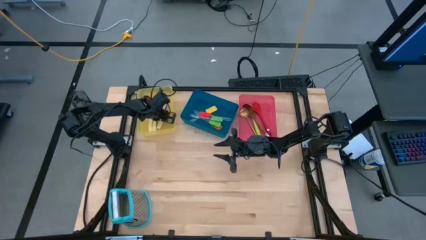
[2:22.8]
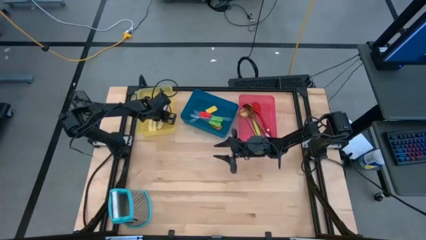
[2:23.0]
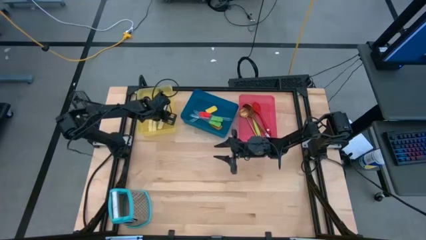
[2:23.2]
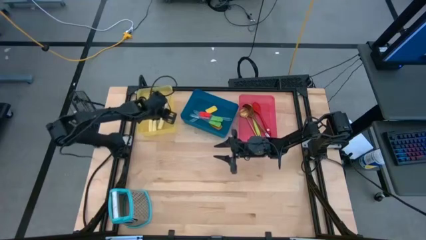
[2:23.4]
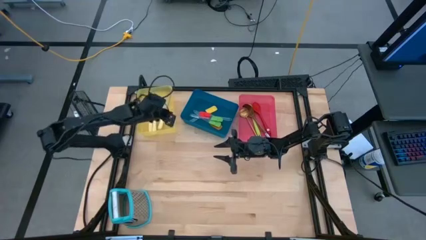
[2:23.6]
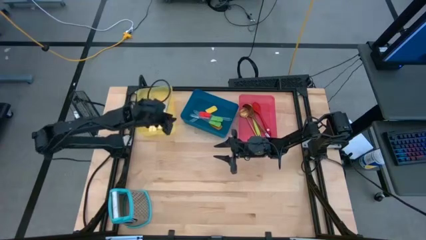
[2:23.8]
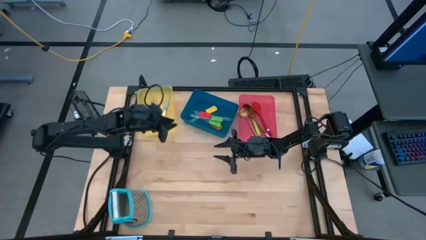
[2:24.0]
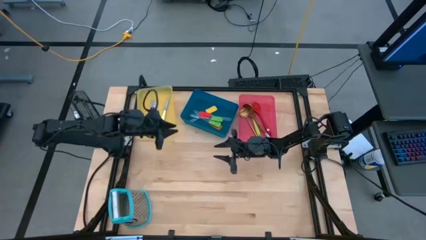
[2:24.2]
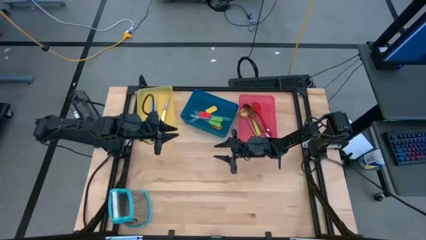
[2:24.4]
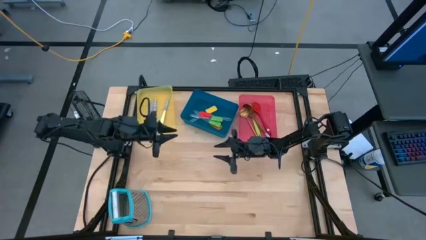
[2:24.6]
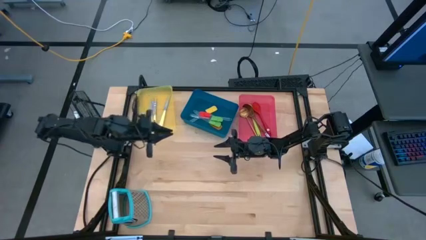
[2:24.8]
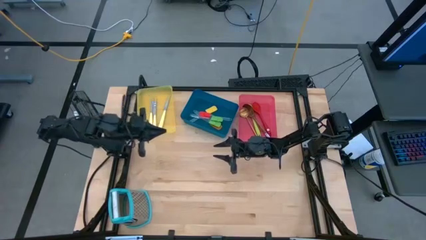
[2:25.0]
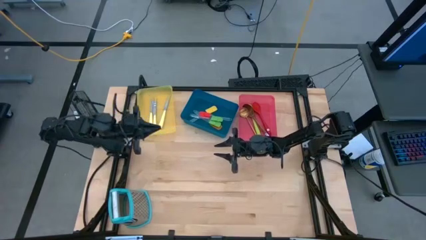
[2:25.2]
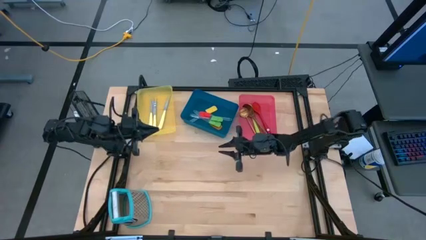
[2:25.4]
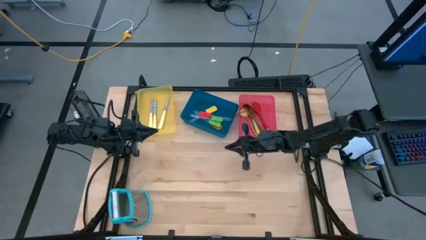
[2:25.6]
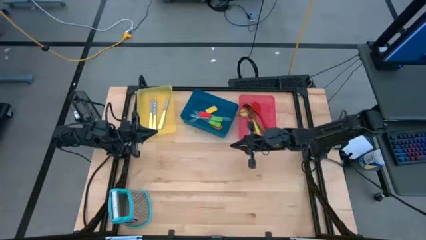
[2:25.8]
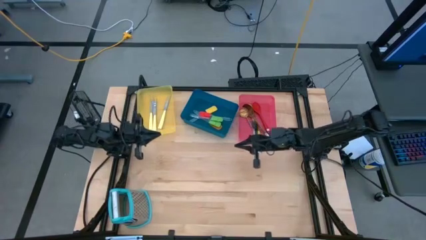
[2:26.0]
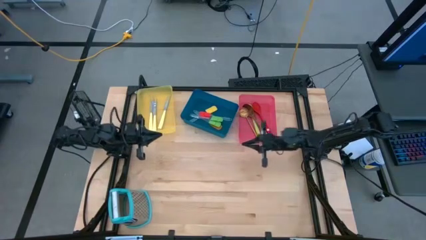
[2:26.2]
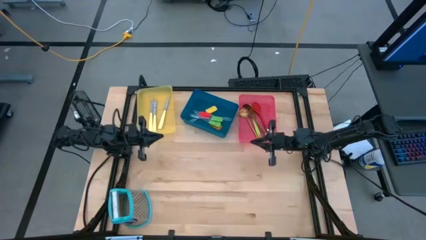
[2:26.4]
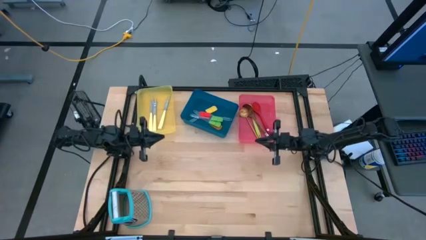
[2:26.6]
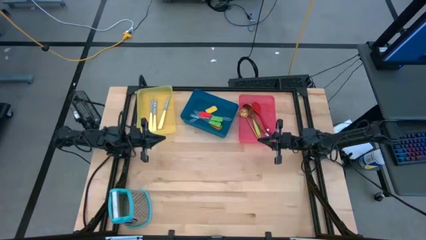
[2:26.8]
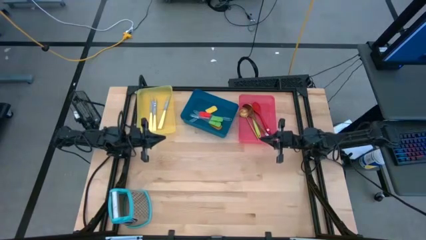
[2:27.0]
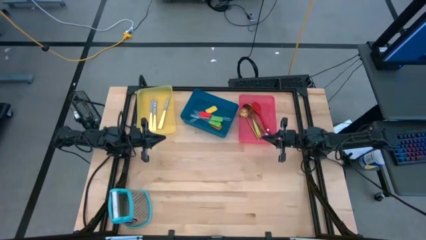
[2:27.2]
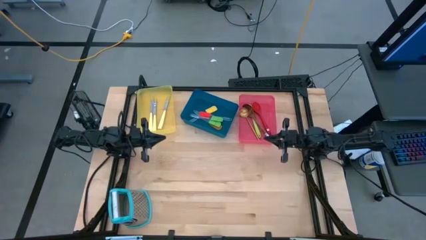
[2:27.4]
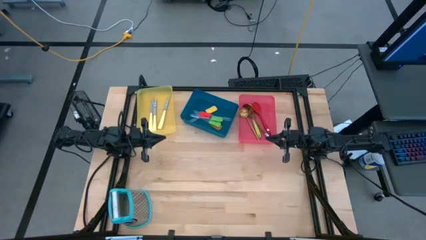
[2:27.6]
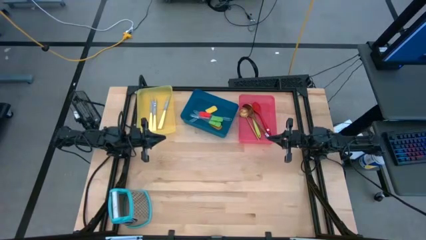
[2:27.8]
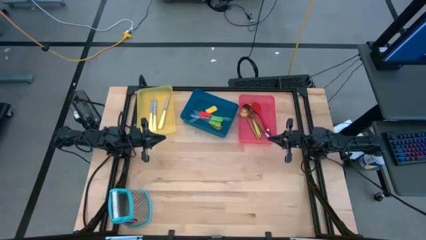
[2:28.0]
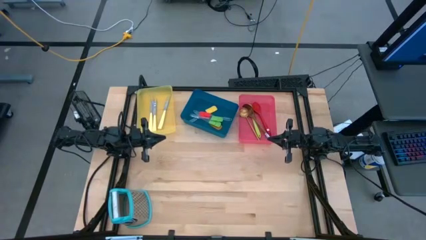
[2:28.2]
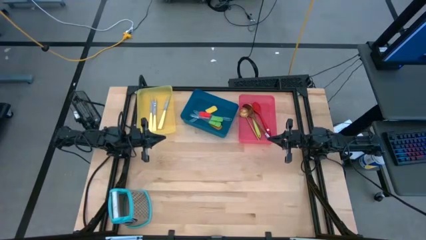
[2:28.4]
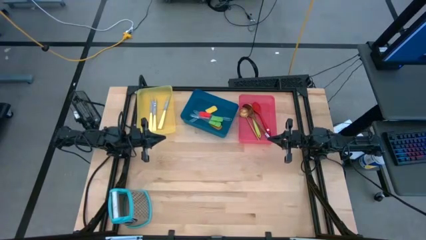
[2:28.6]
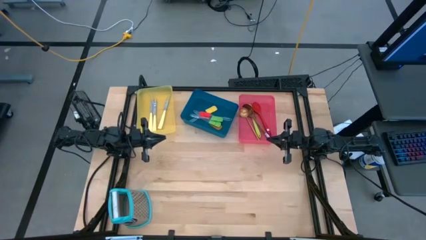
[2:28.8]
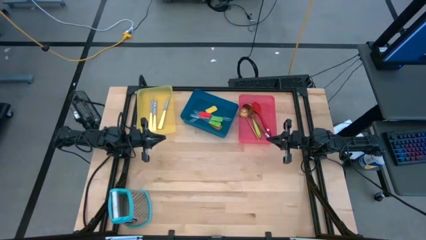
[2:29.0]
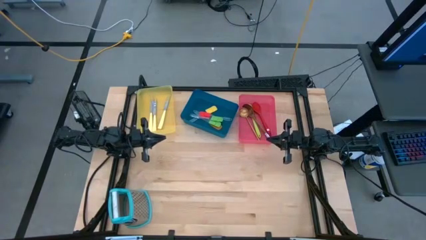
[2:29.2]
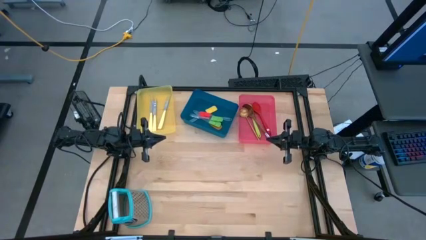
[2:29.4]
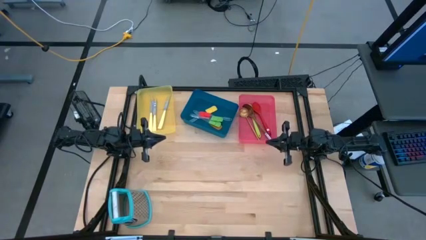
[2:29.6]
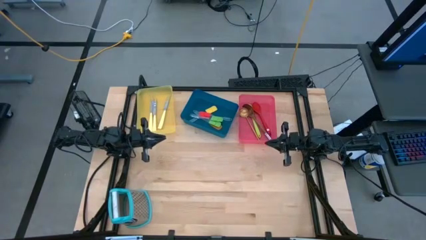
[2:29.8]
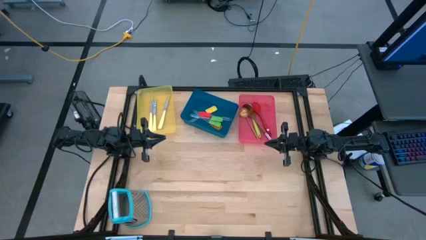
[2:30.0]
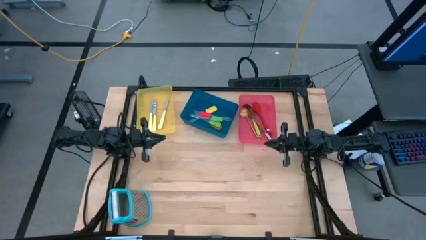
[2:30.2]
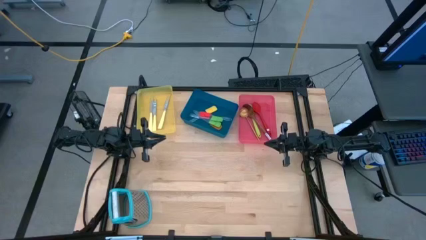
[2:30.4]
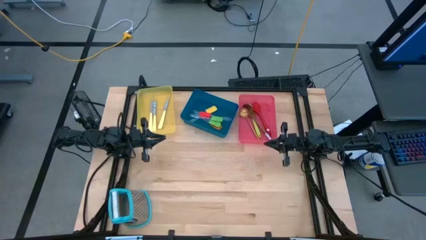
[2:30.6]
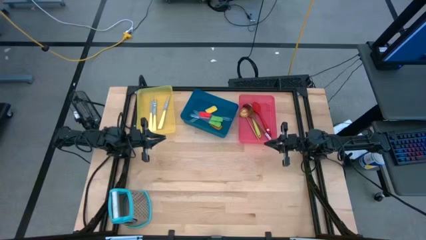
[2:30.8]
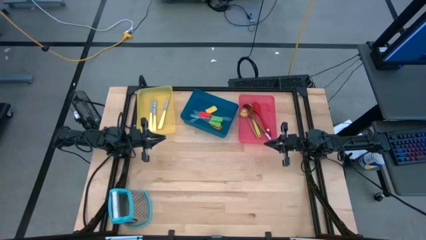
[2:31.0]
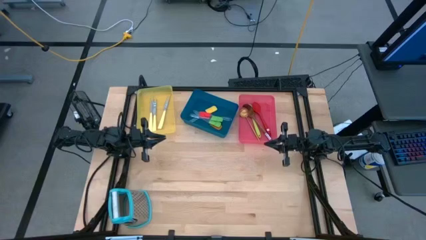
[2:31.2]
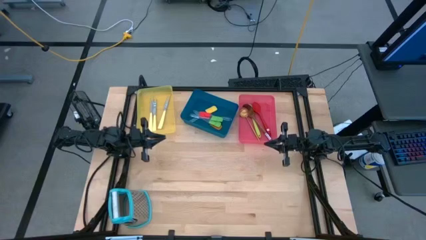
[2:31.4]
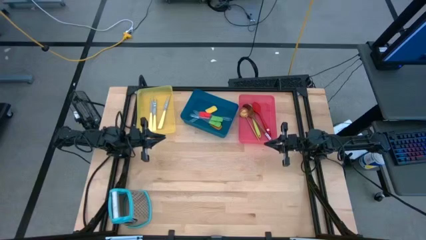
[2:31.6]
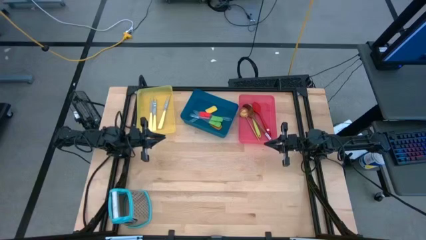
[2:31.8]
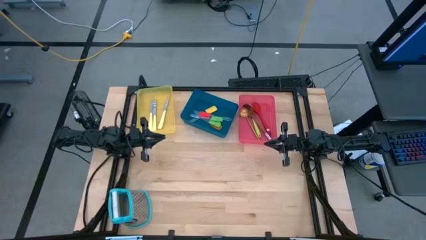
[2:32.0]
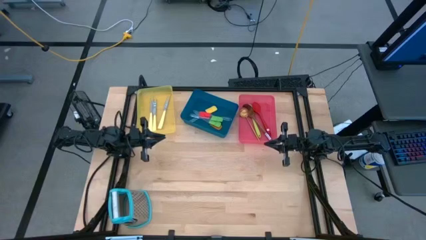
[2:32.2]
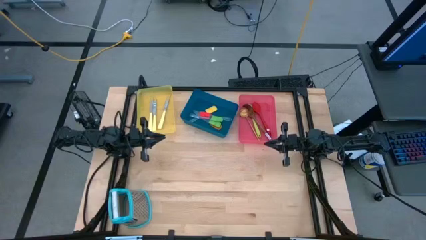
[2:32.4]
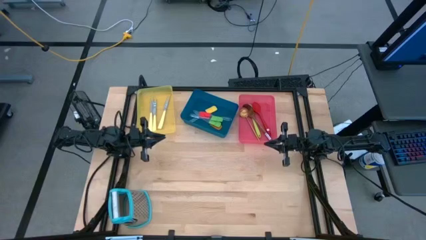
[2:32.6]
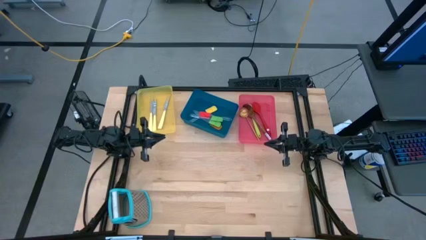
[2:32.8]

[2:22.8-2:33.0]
Task: Pick & Place Kitchen Items
Return to Home Position

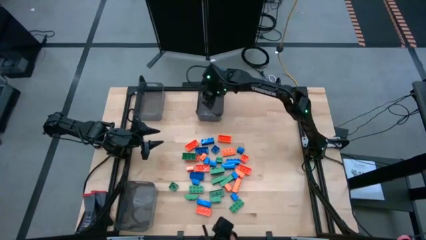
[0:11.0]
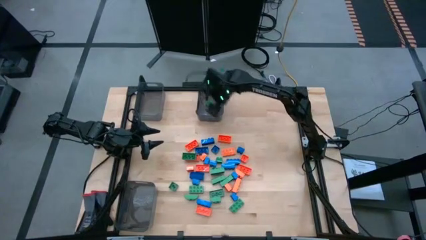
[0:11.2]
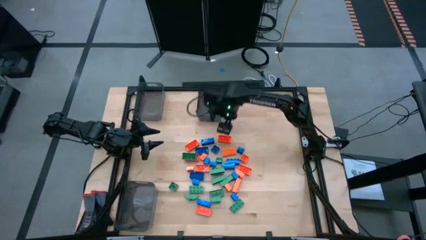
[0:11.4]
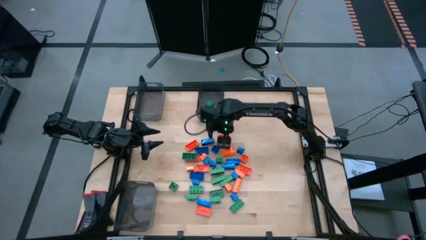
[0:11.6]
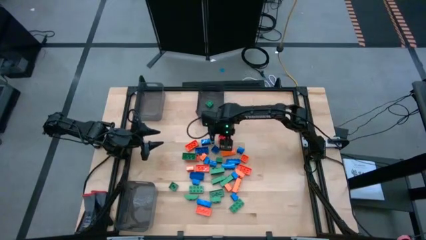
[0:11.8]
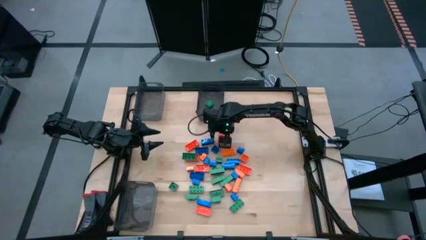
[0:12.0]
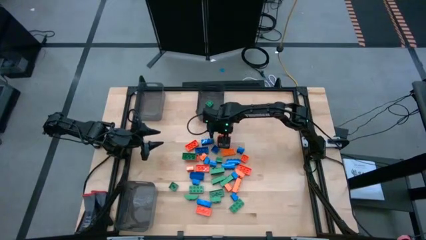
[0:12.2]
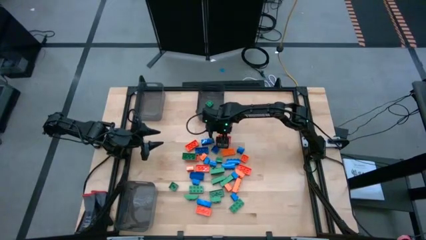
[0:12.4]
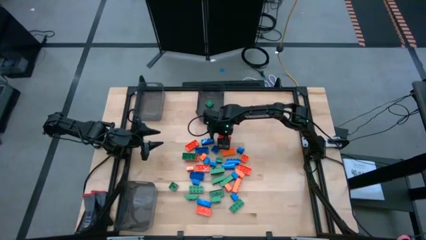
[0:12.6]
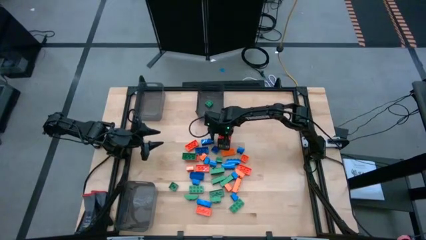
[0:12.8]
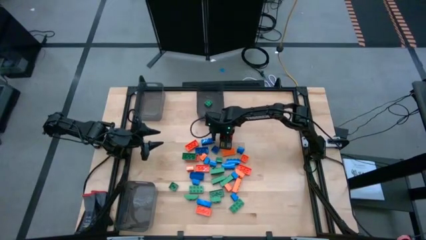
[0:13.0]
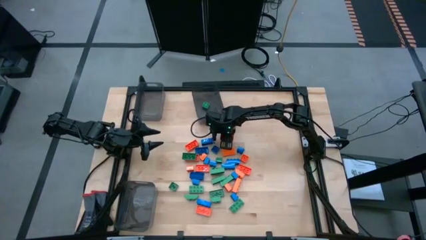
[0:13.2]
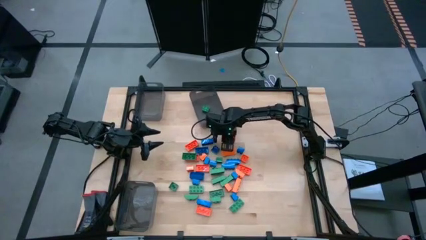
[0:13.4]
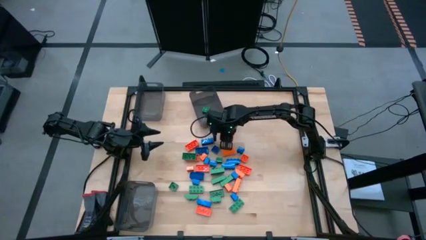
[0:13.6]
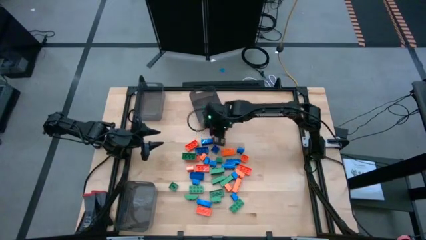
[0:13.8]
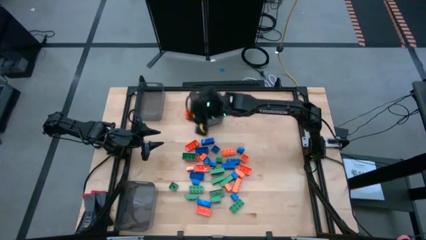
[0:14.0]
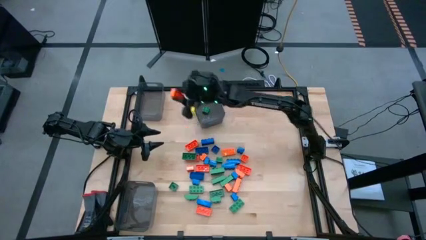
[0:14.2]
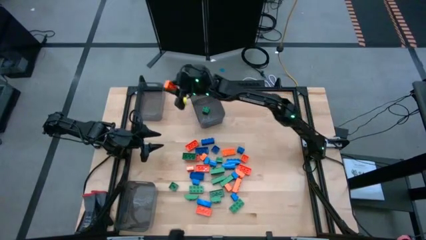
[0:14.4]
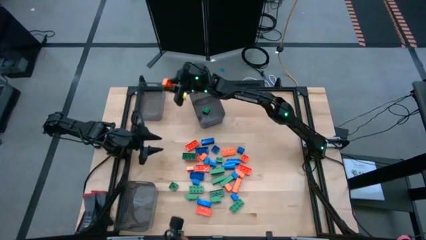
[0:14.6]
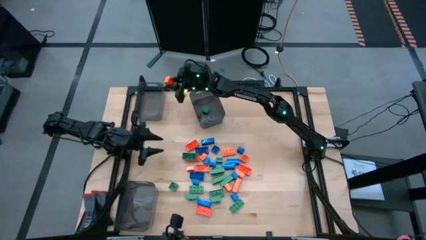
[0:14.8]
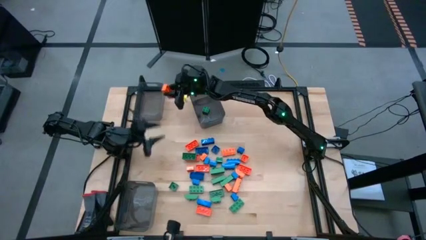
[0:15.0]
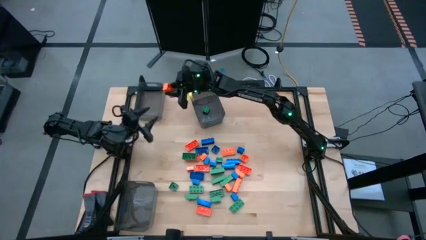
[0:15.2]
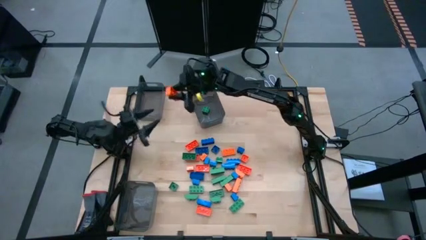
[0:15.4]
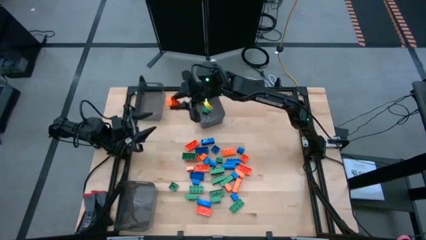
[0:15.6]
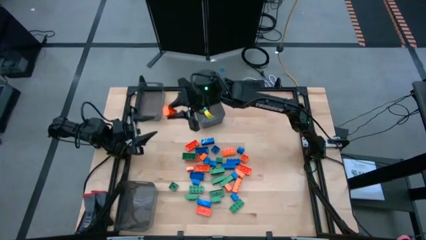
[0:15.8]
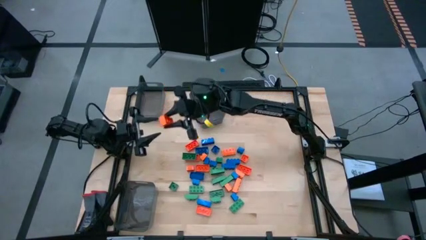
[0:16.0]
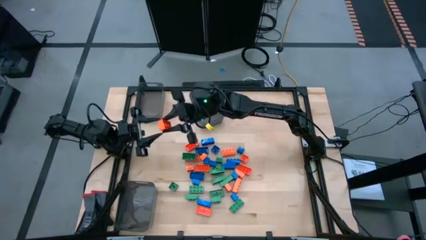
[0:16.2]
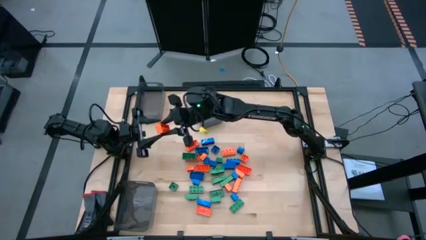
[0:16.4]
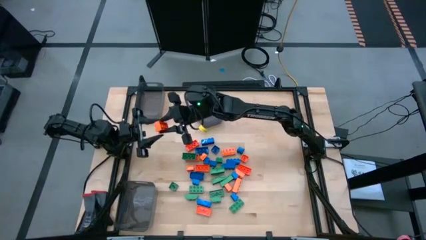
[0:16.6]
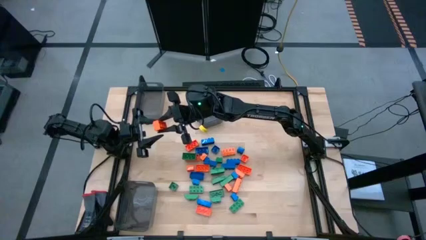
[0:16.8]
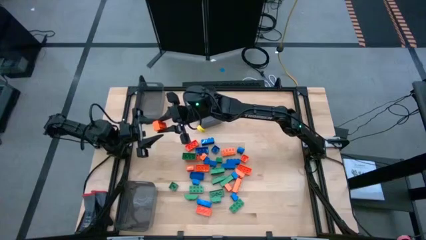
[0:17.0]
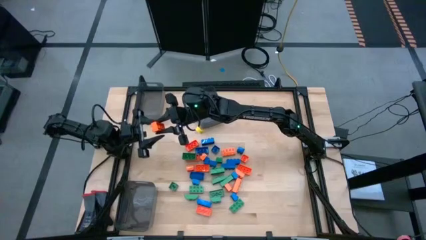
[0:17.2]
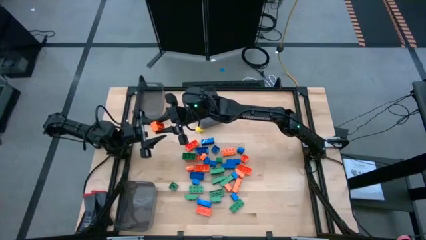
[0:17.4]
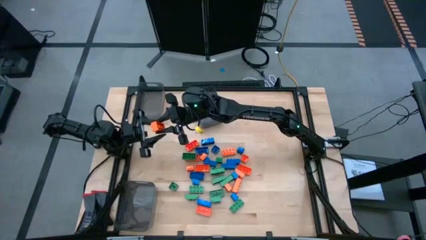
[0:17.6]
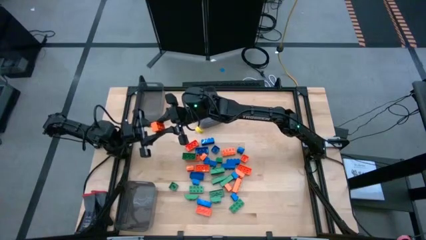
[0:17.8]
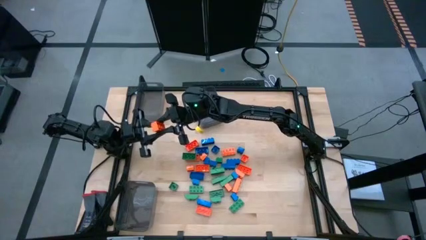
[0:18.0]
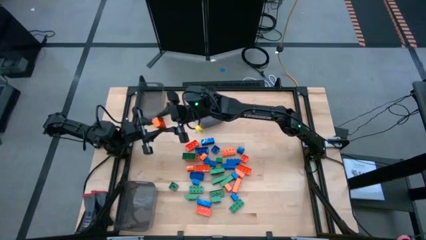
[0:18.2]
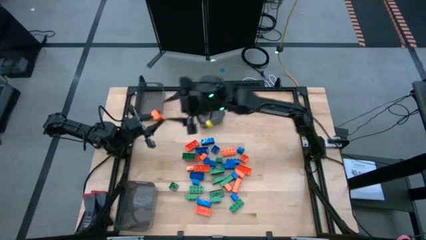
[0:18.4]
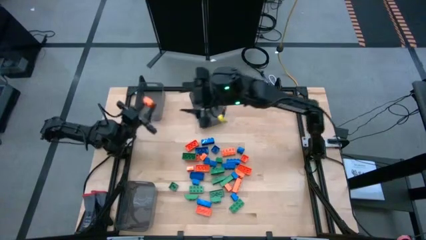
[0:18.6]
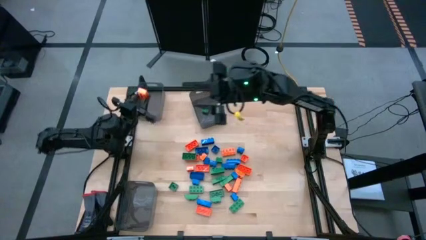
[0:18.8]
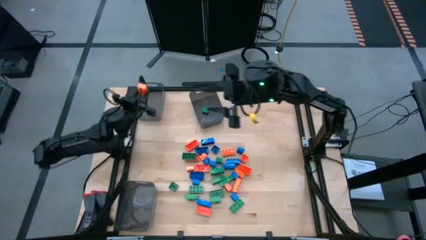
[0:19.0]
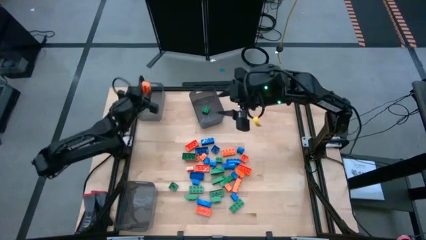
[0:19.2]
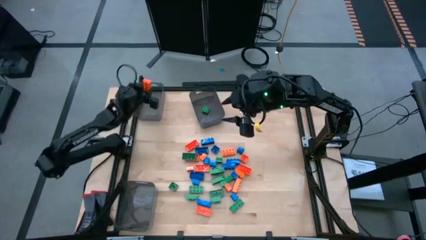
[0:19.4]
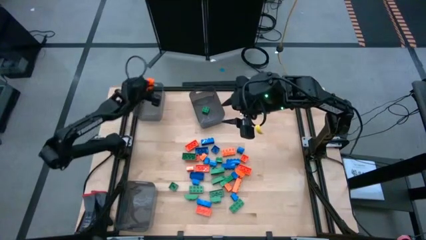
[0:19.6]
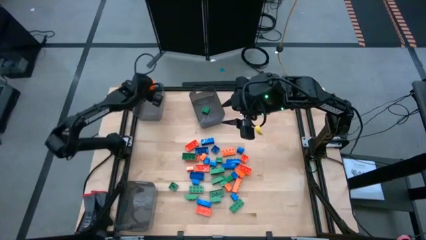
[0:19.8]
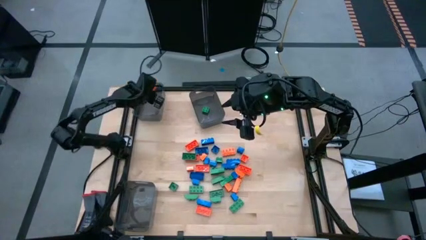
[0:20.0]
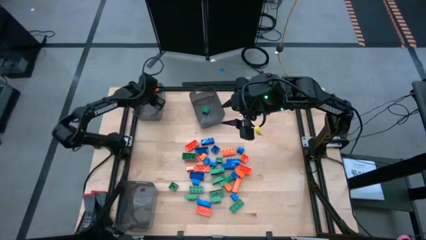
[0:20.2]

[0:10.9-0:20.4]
Task: Sort blocks
Put the orange game piece into the top left black transparent bin
